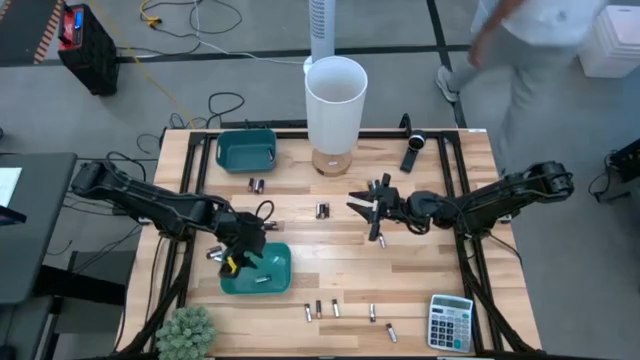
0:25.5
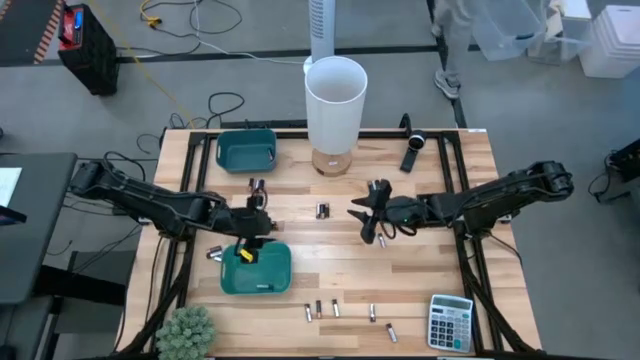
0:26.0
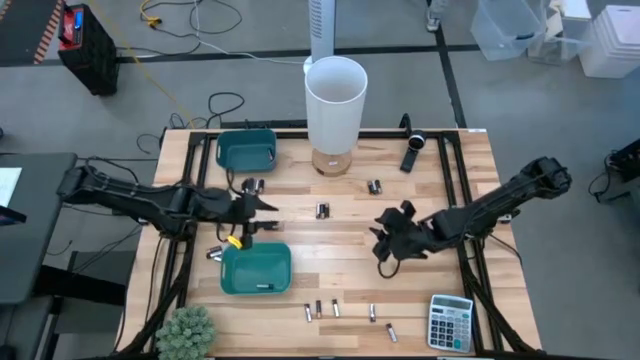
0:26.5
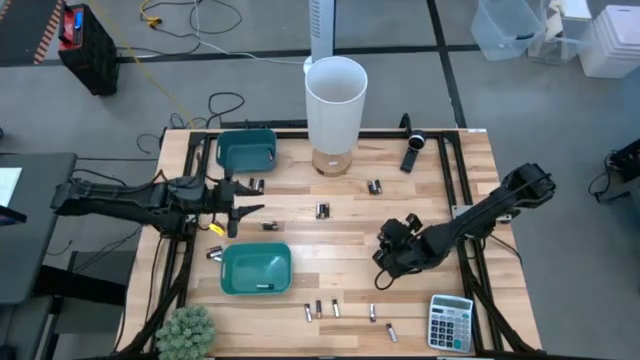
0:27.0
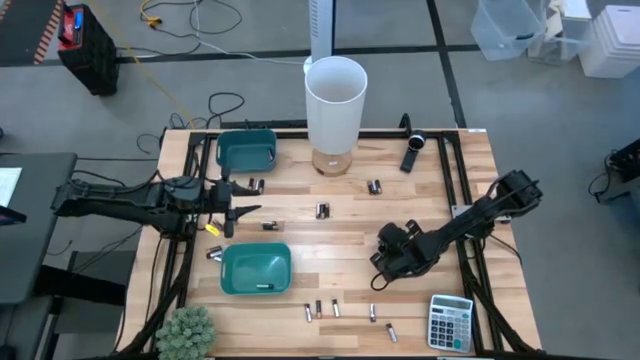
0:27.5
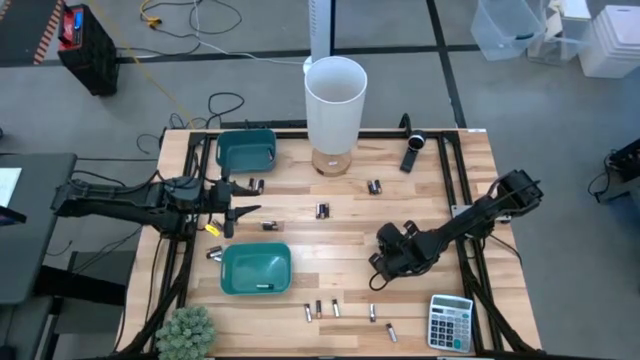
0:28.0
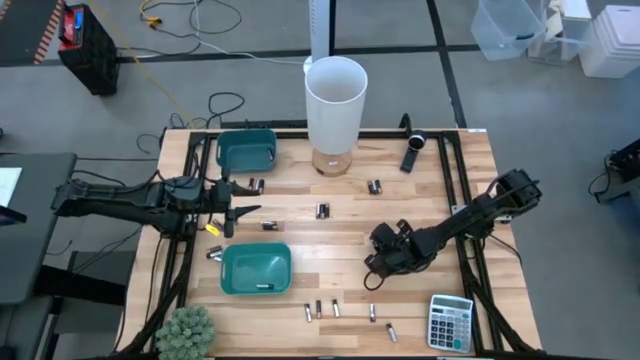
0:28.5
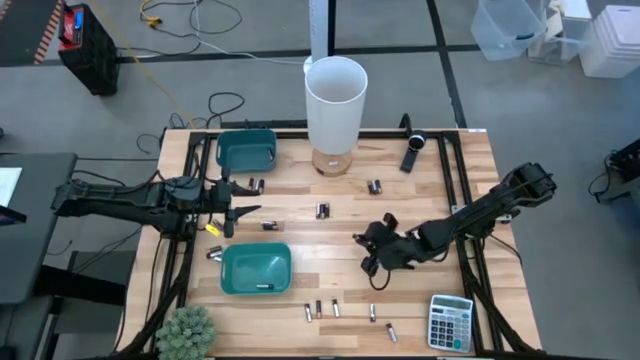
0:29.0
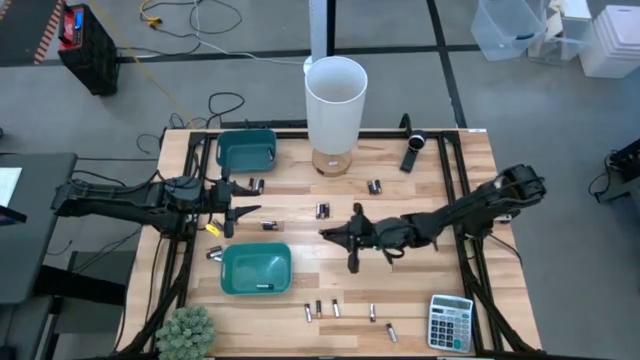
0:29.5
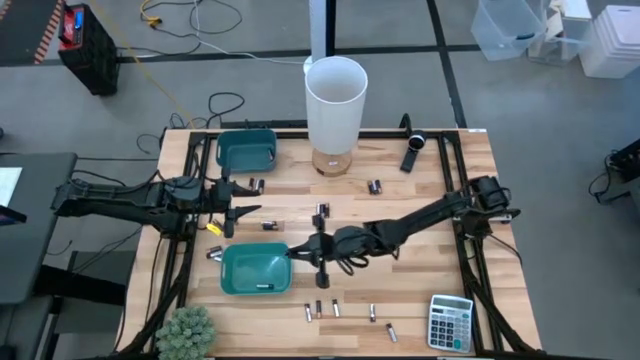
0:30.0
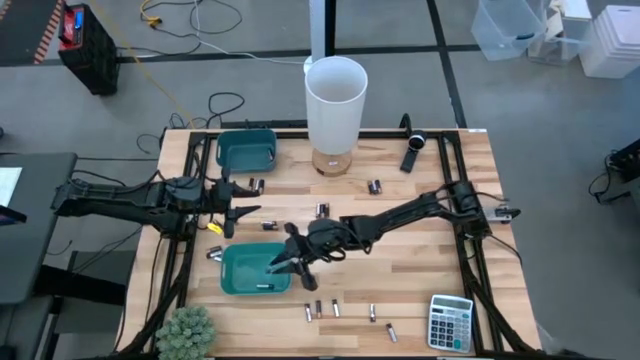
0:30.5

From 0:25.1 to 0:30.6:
Task: Sort batteries
Put the silver battery into the green bin

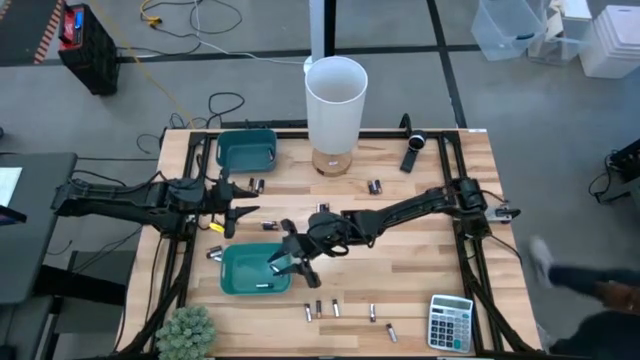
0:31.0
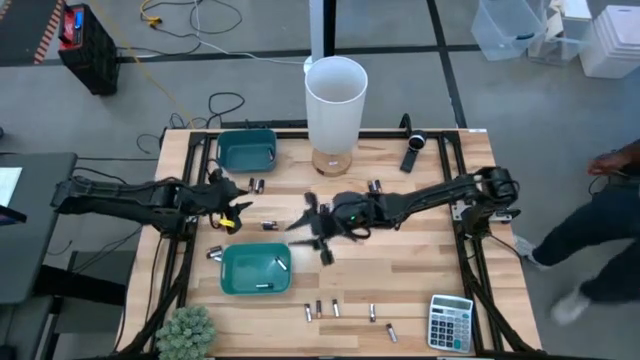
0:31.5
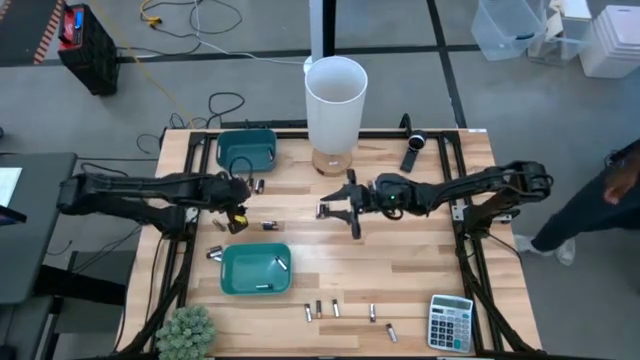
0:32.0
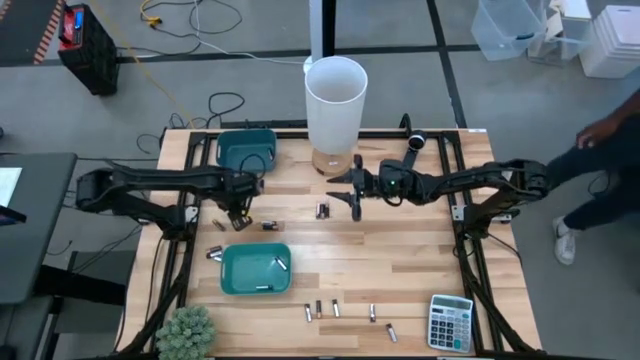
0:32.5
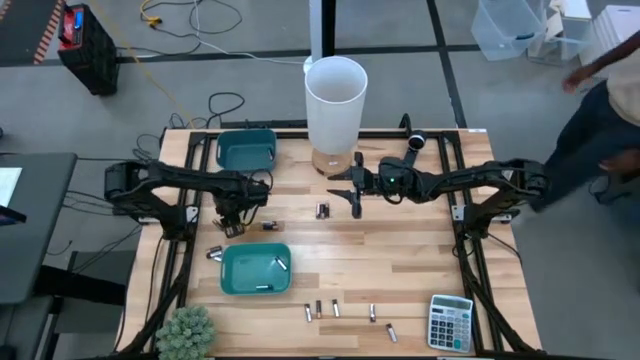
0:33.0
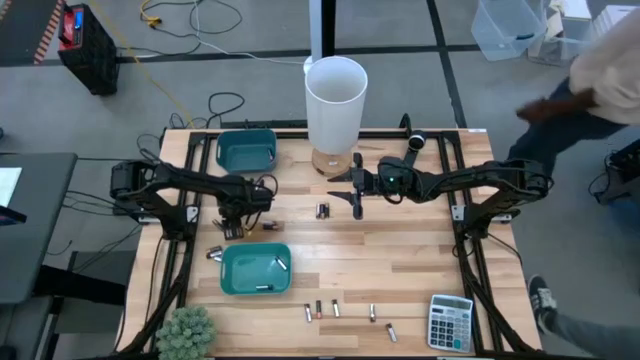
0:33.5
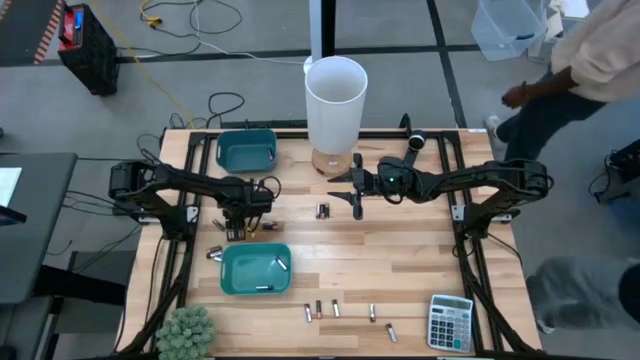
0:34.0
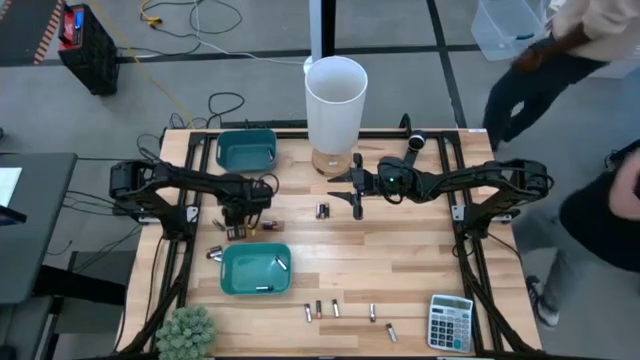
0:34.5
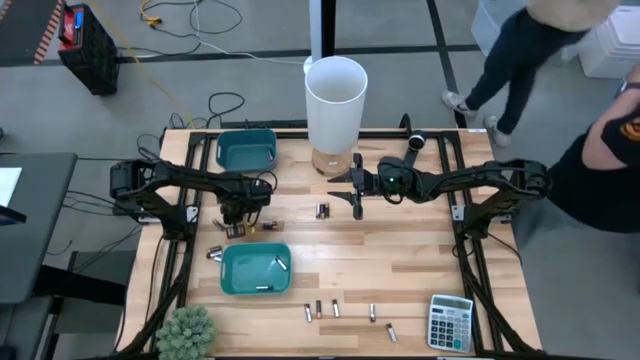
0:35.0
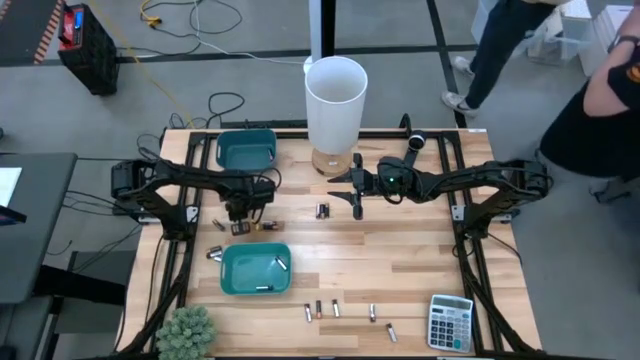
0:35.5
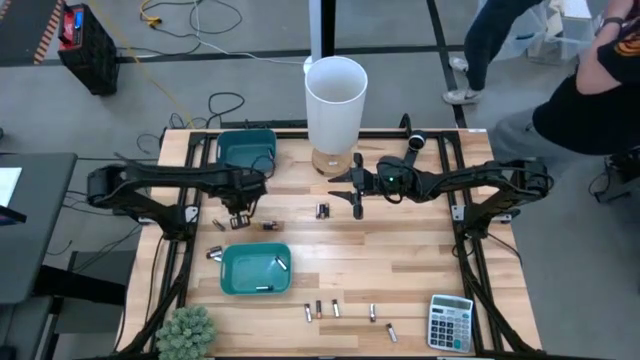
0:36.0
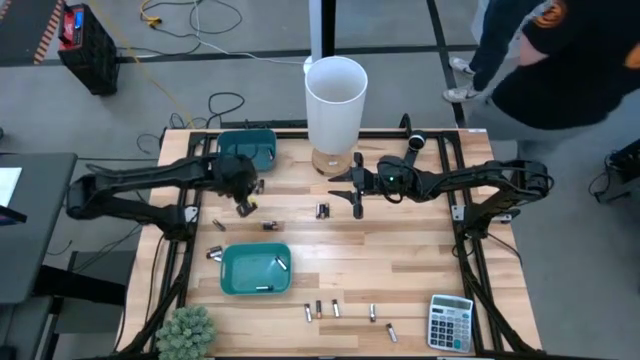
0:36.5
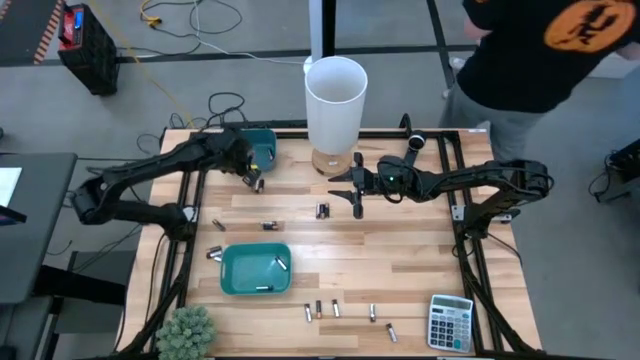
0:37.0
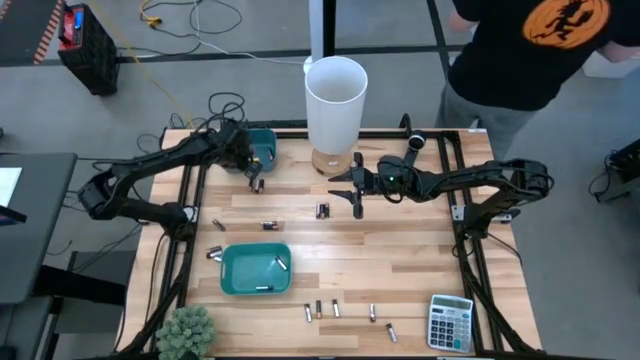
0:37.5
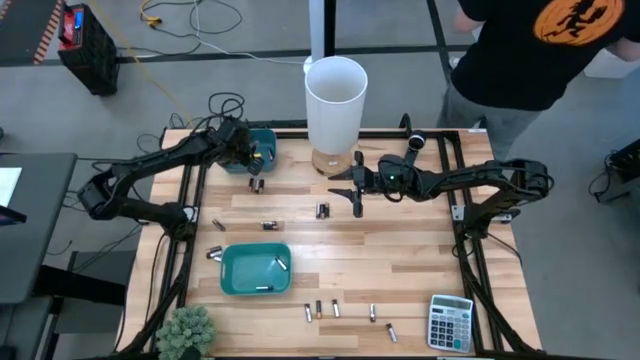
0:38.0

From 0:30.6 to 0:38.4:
Put the black battery into the blue bin

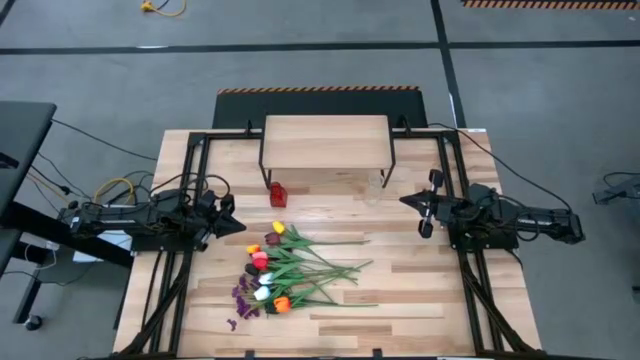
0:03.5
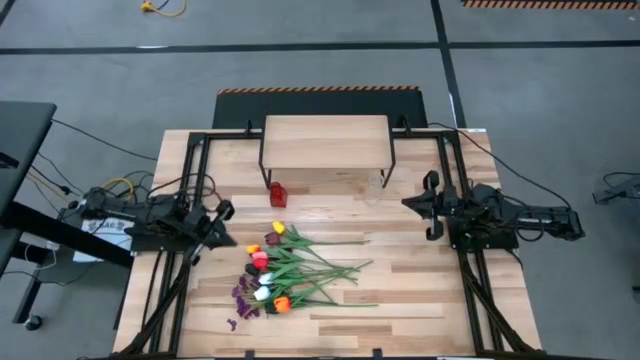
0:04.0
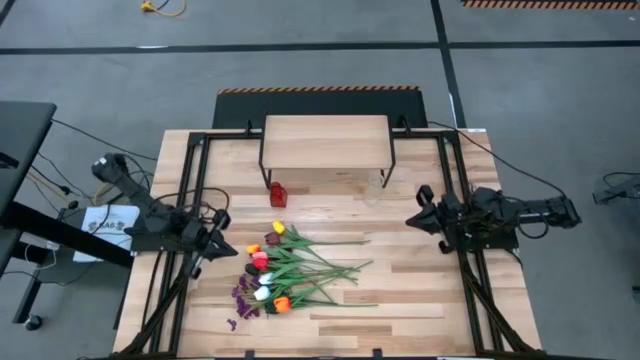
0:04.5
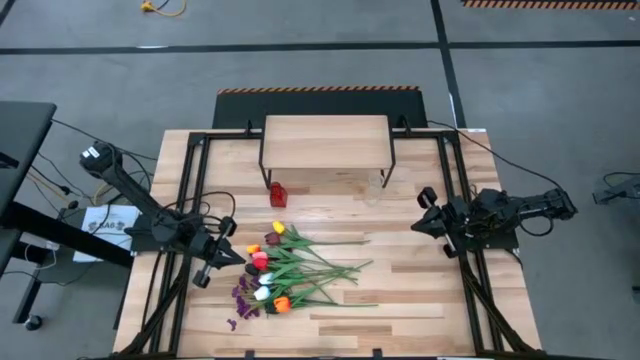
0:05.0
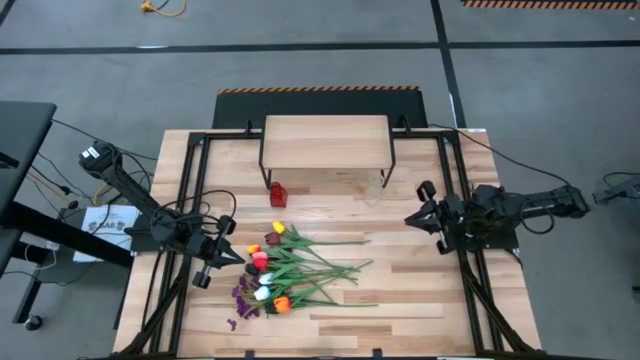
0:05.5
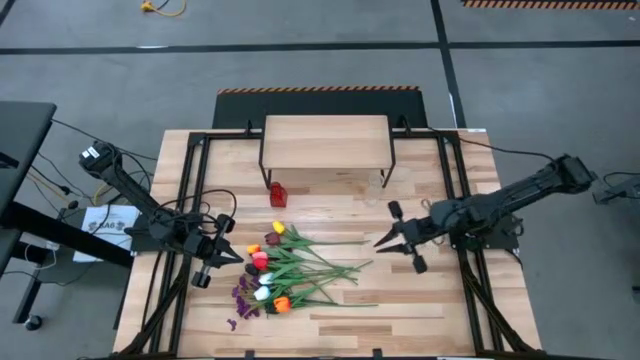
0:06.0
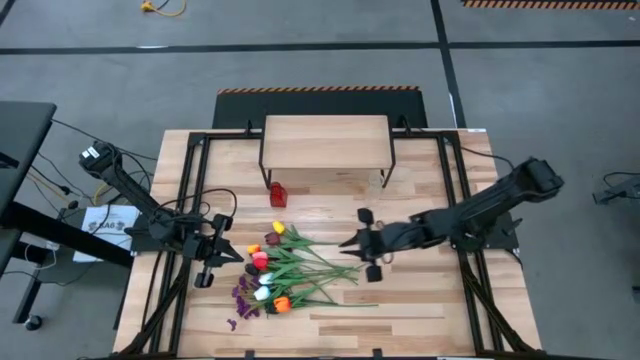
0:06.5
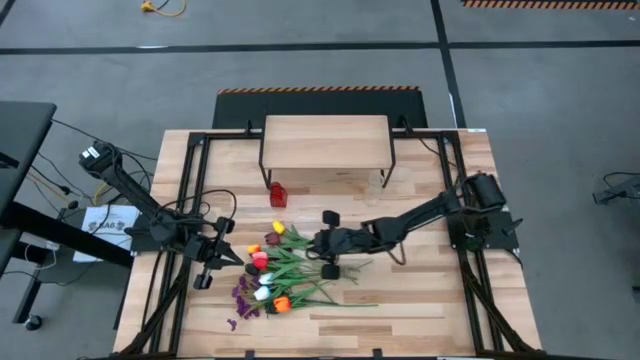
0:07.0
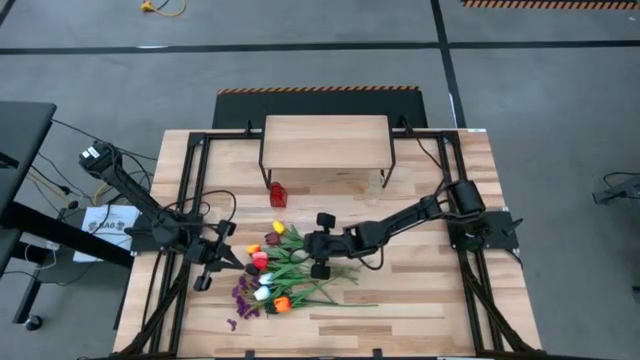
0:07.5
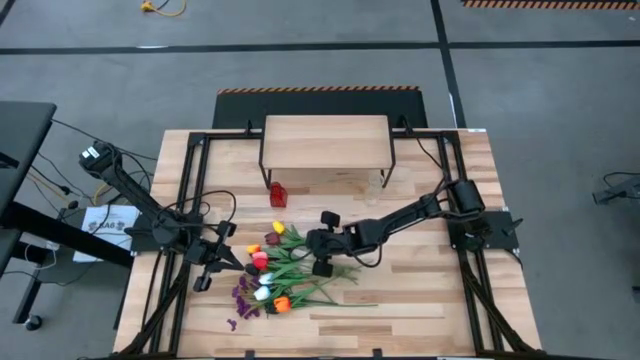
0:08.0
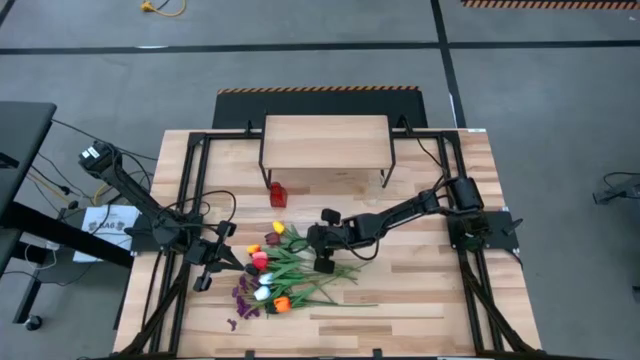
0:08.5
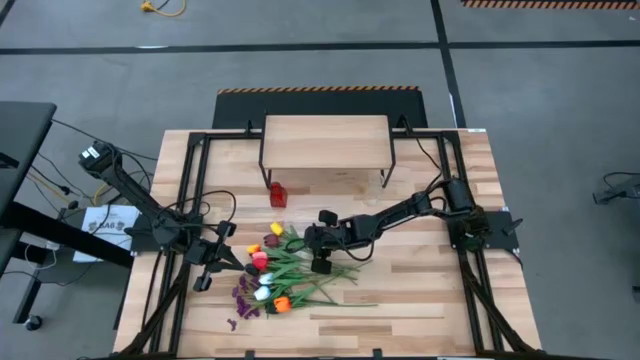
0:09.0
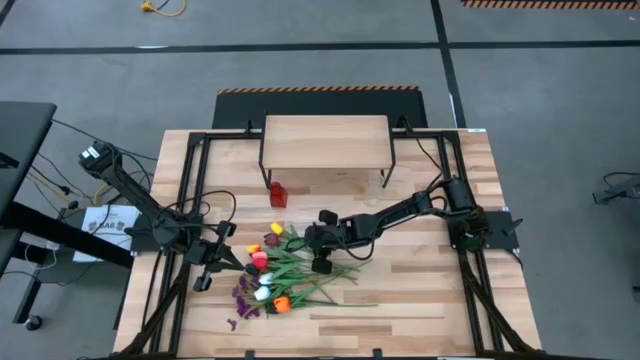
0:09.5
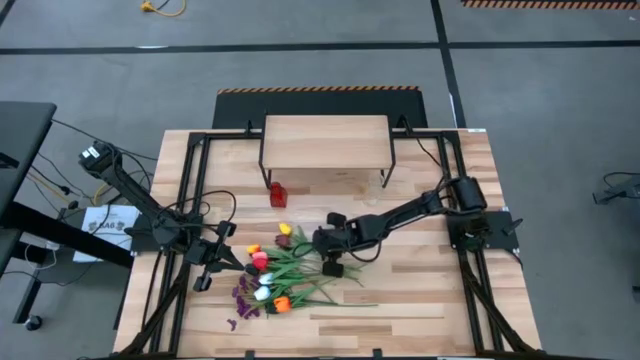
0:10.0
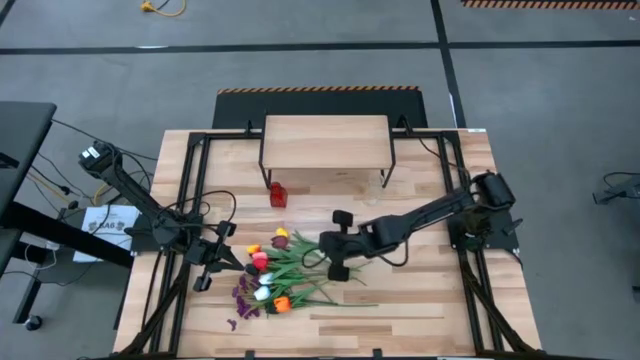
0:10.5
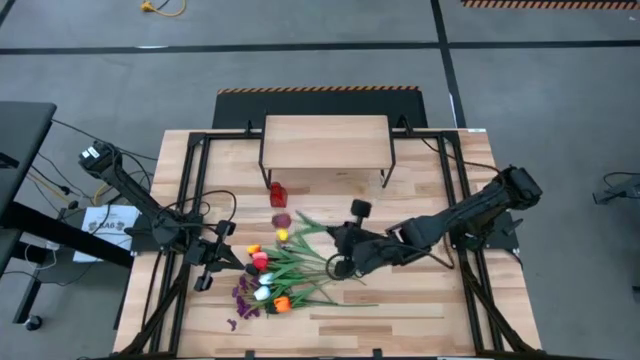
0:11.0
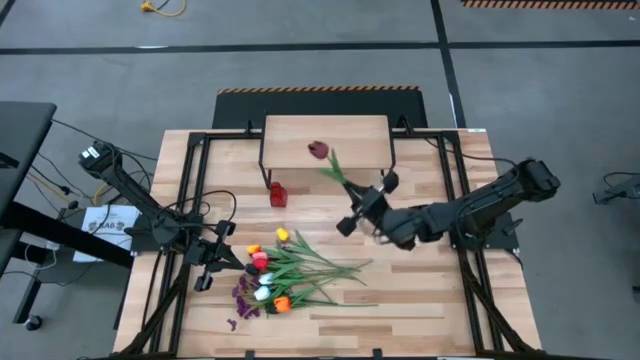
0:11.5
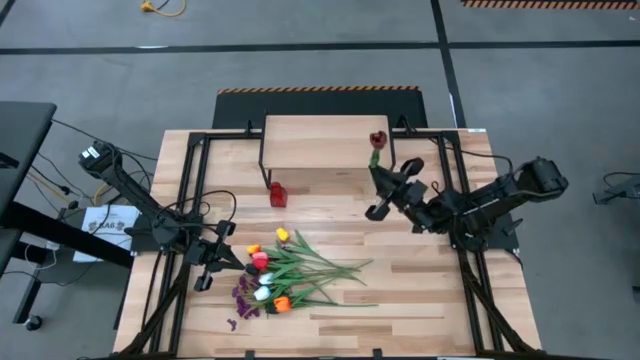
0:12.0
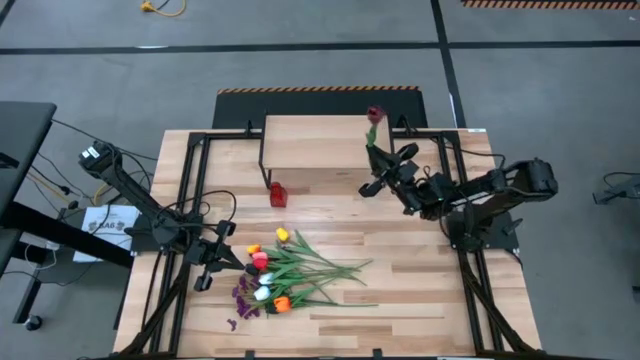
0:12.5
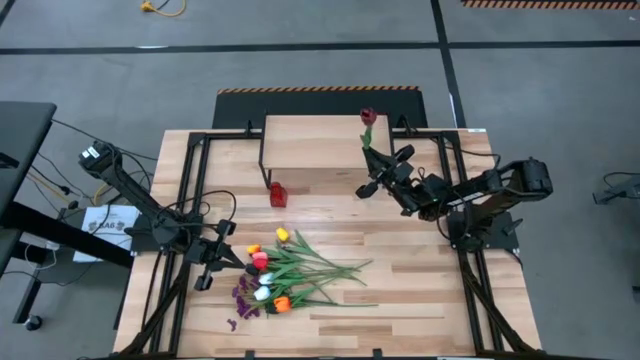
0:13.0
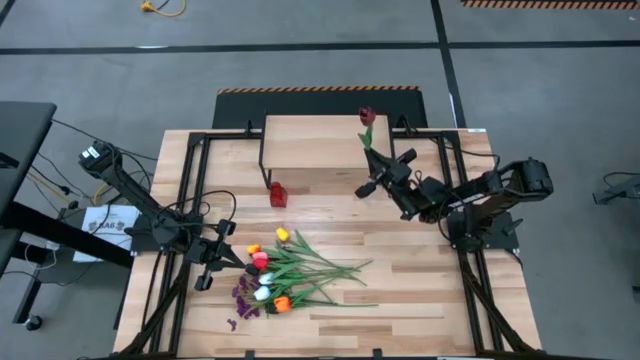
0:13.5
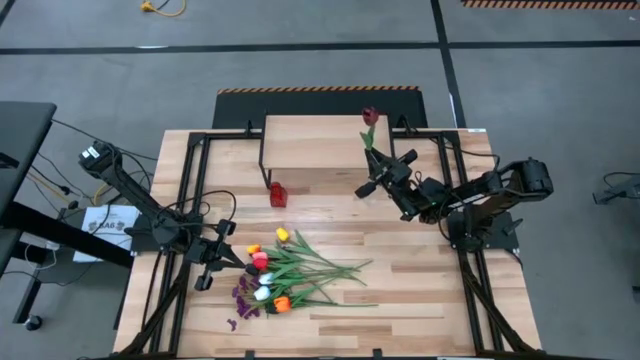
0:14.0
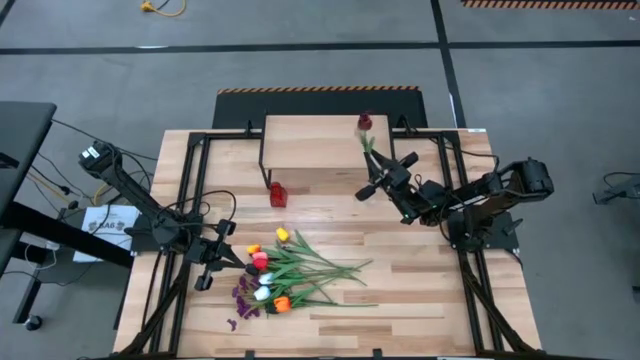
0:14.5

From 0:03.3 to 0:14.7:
Task: Pick and place flowers into a vace then onto a shelf
Put the pink flower into the transparent vase
